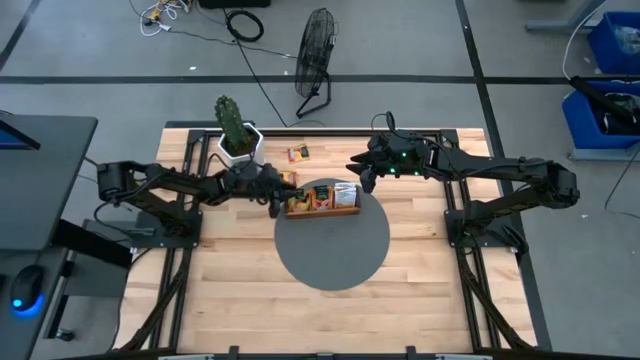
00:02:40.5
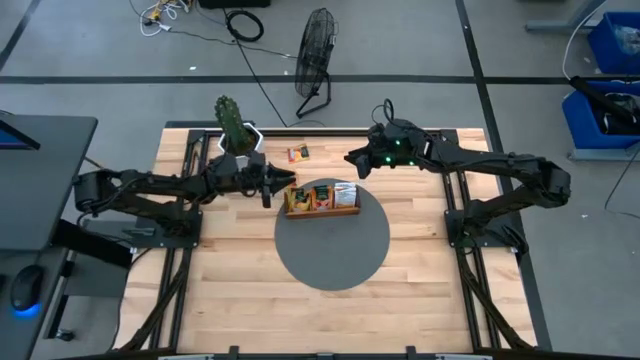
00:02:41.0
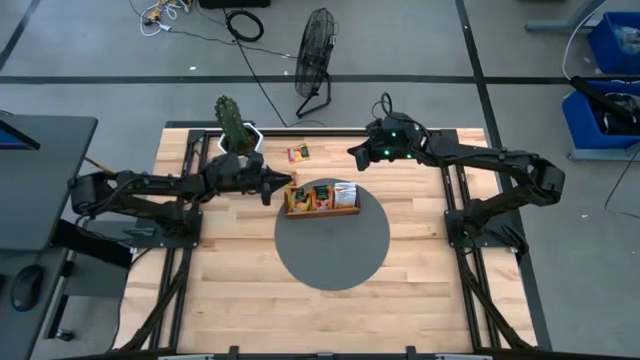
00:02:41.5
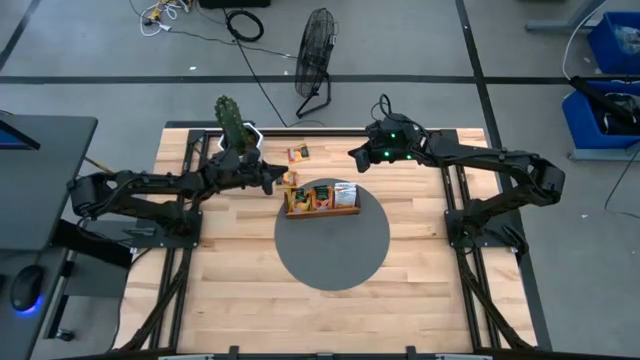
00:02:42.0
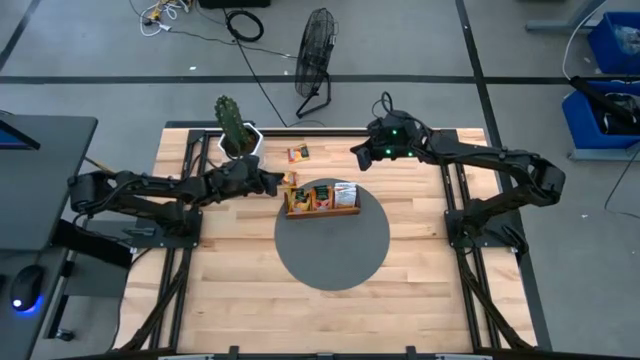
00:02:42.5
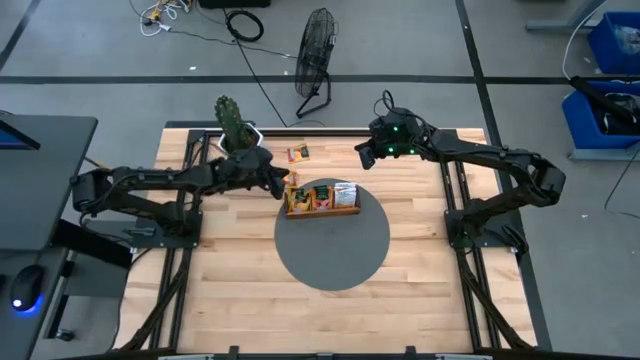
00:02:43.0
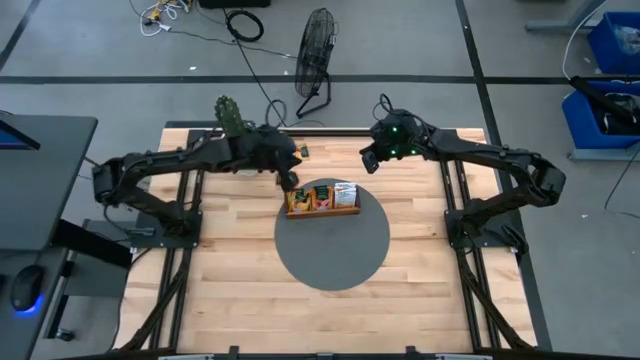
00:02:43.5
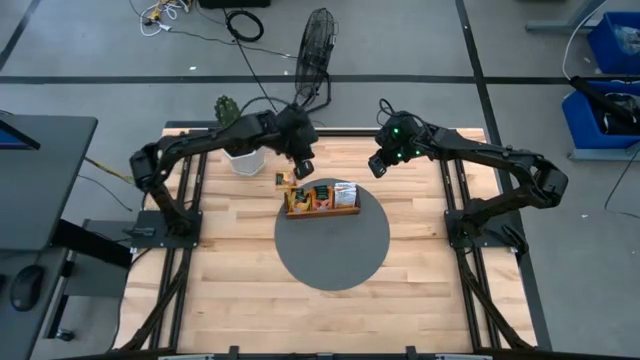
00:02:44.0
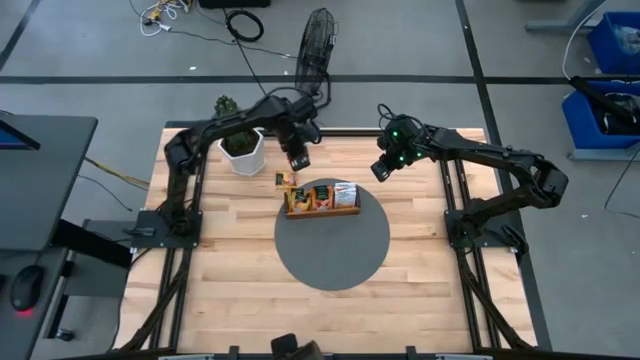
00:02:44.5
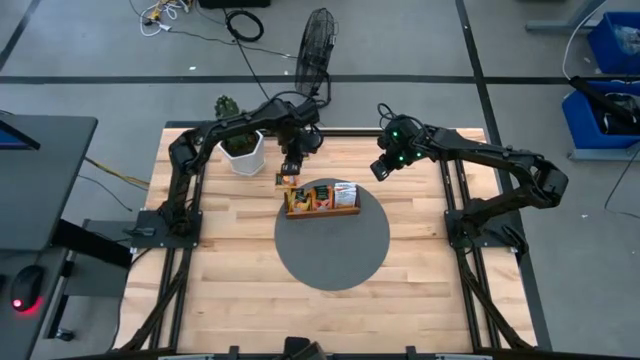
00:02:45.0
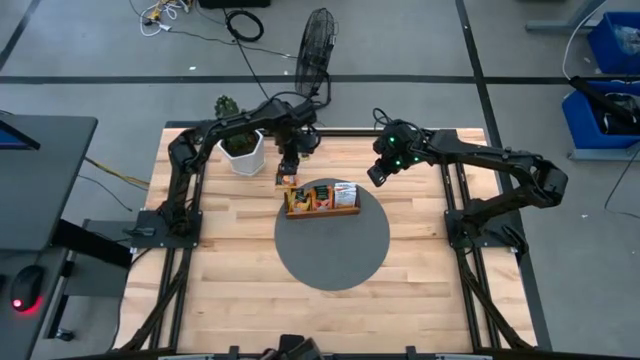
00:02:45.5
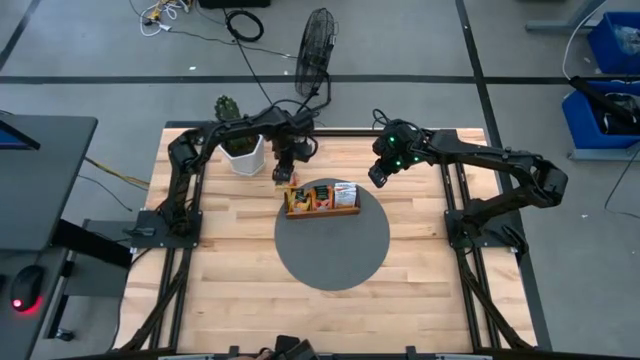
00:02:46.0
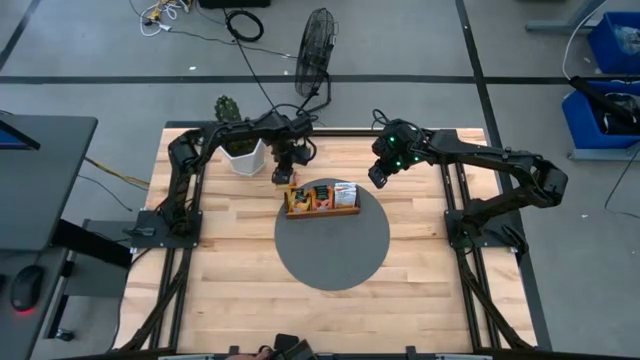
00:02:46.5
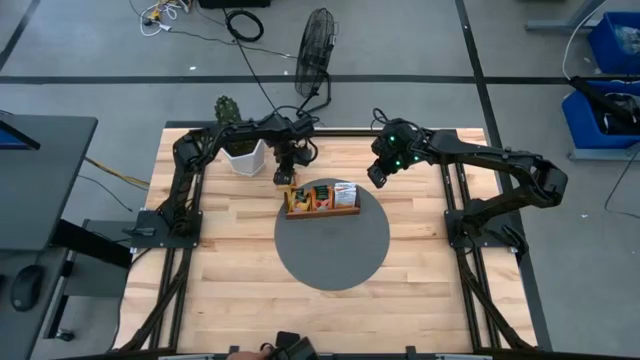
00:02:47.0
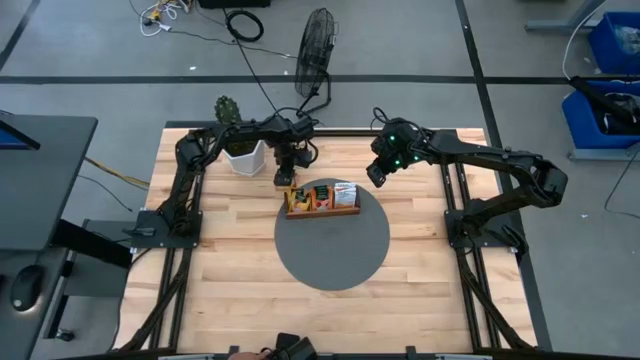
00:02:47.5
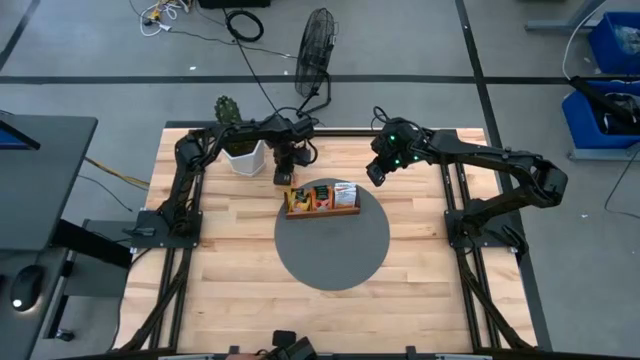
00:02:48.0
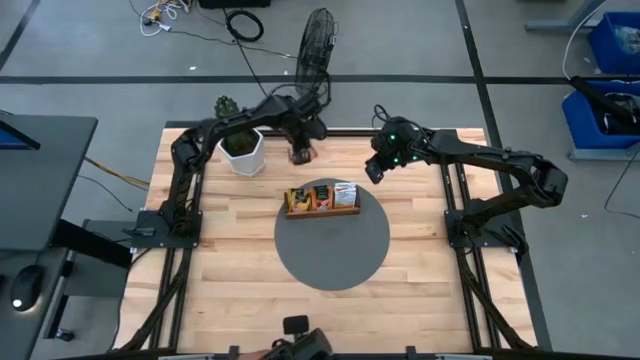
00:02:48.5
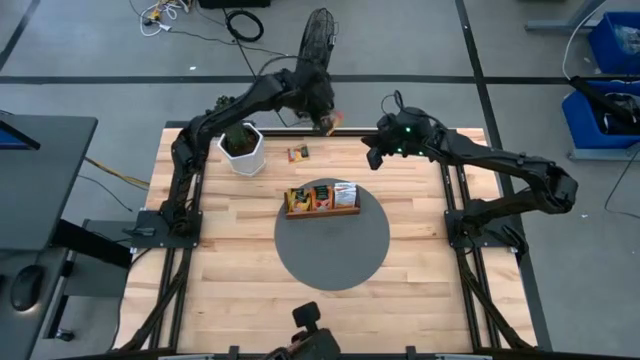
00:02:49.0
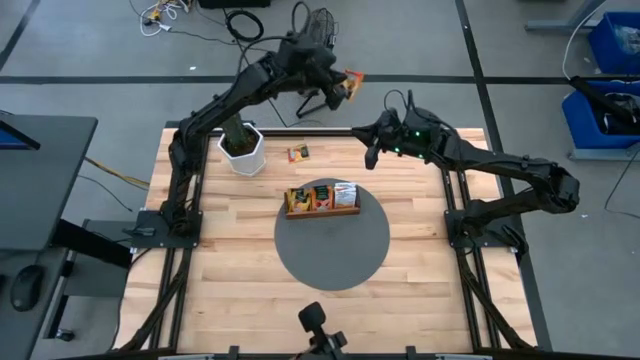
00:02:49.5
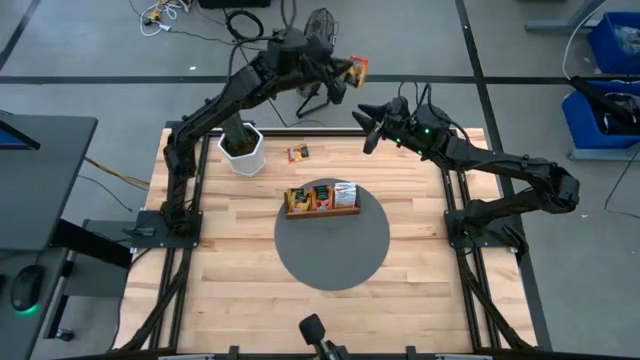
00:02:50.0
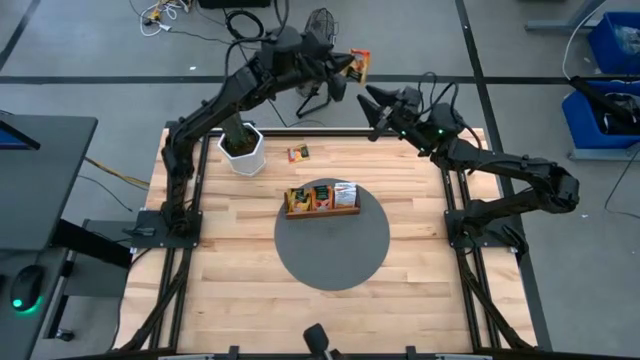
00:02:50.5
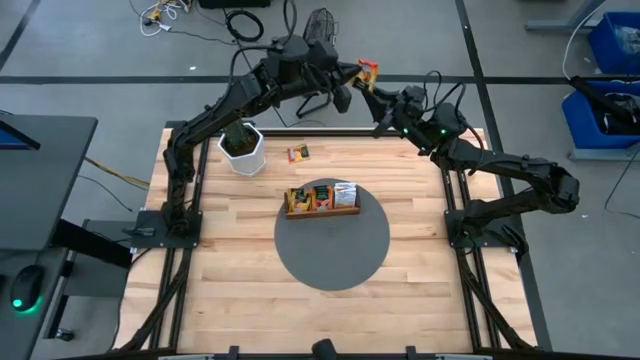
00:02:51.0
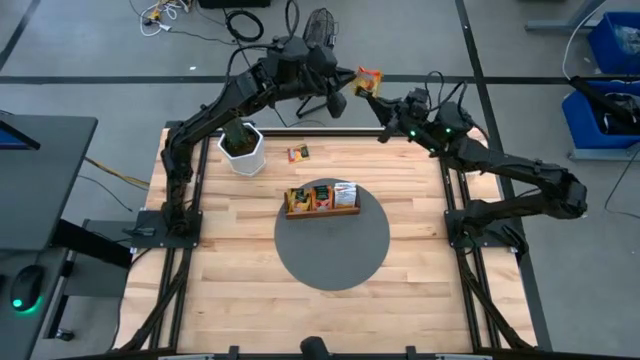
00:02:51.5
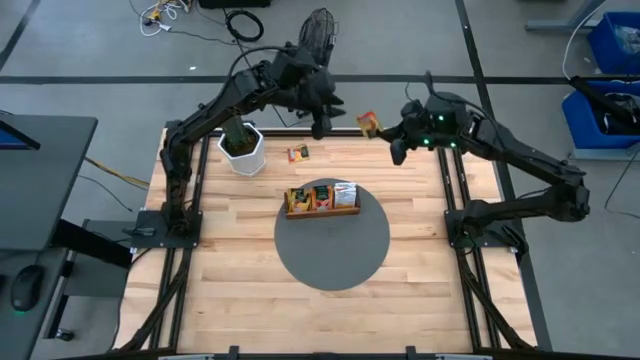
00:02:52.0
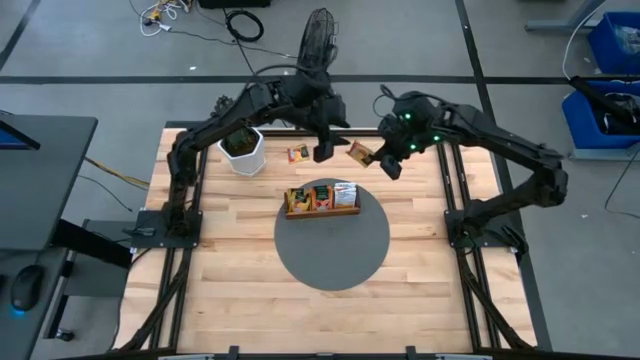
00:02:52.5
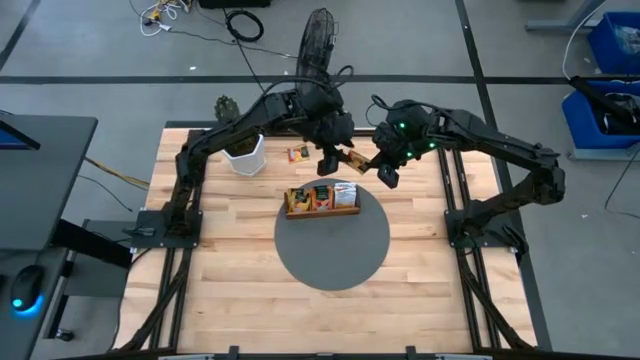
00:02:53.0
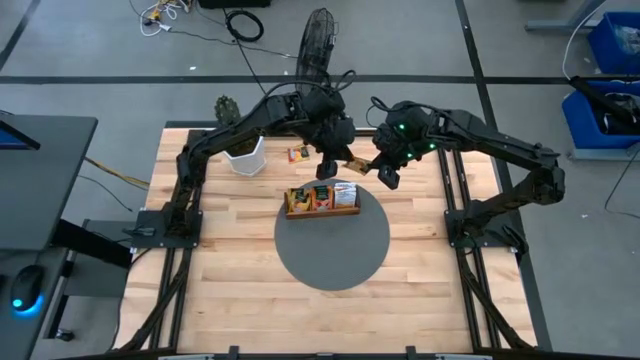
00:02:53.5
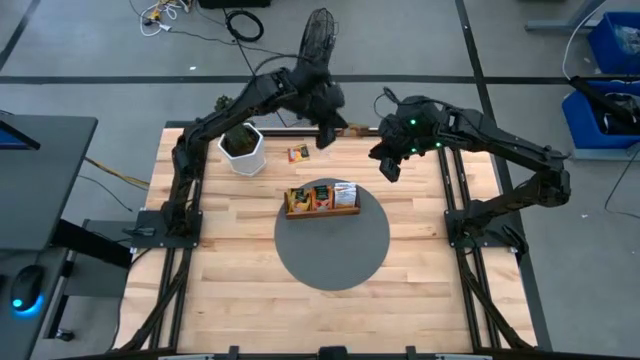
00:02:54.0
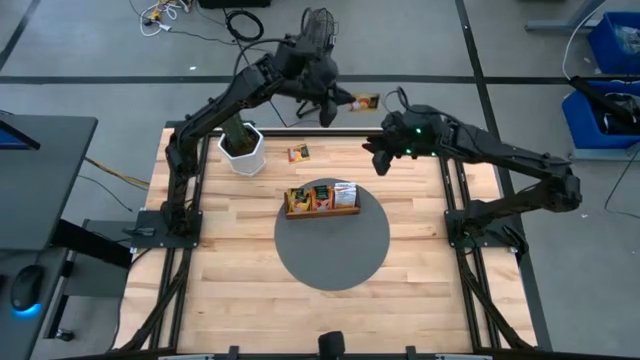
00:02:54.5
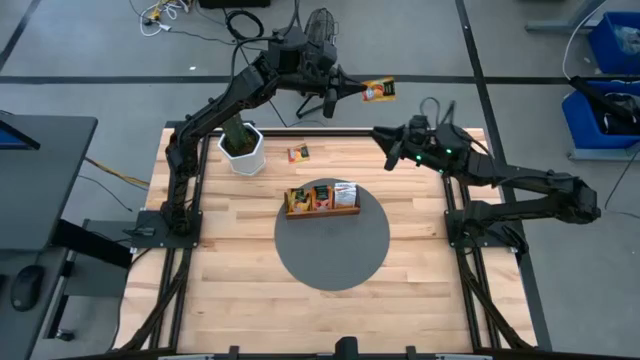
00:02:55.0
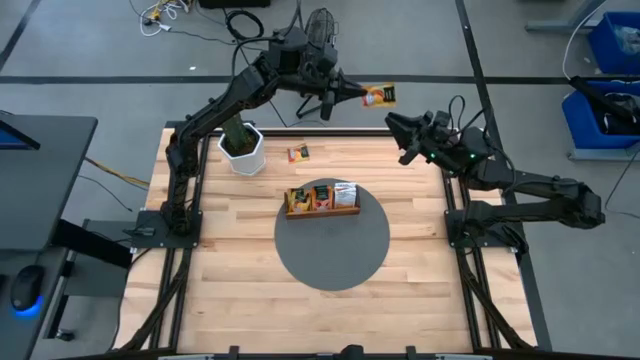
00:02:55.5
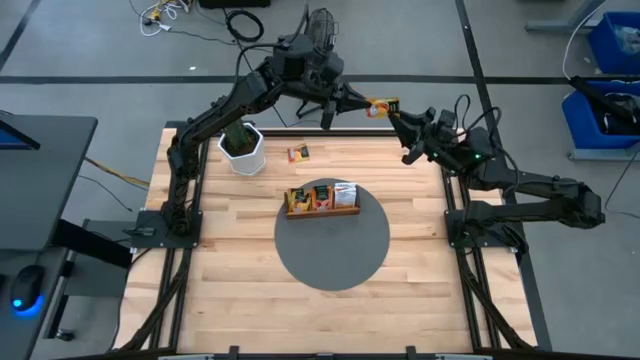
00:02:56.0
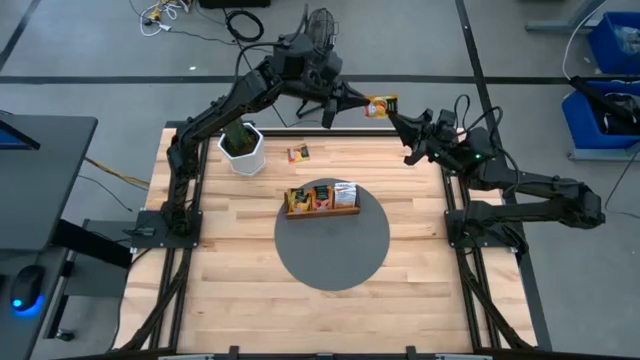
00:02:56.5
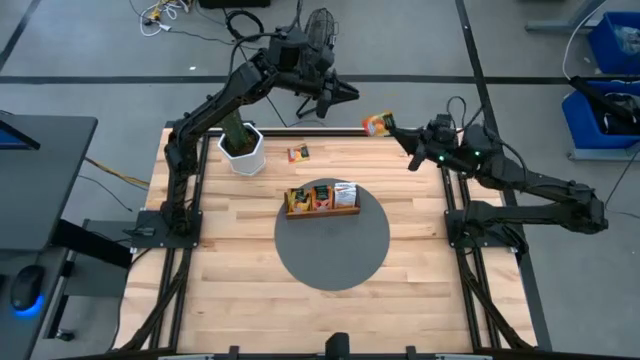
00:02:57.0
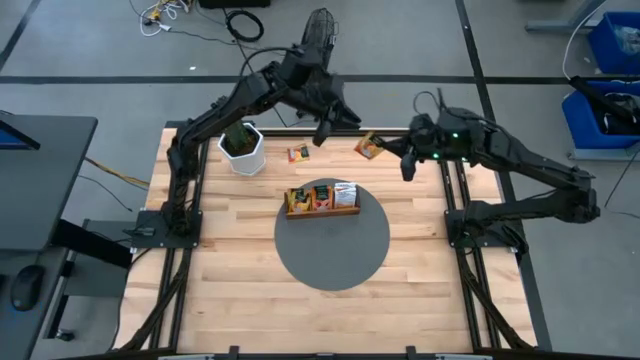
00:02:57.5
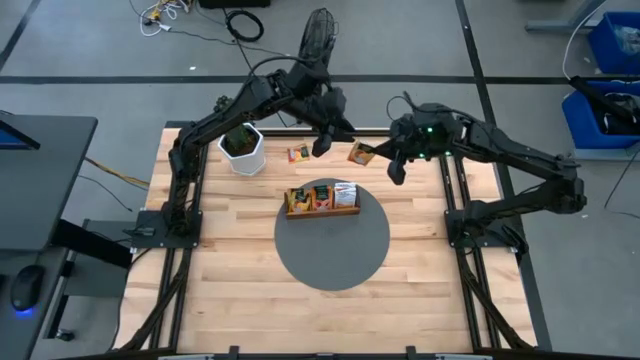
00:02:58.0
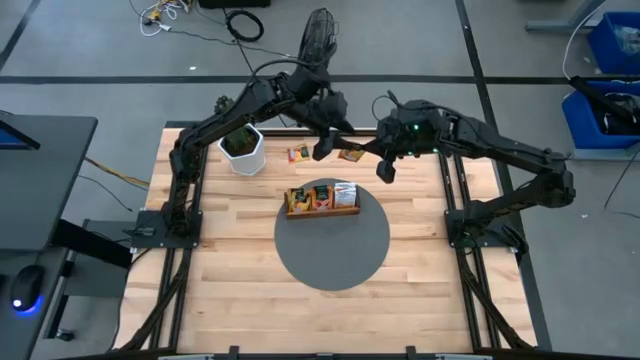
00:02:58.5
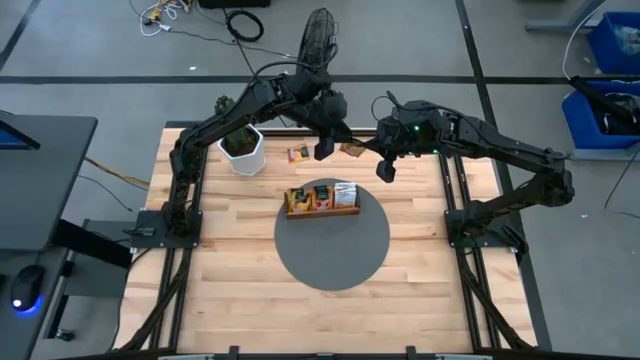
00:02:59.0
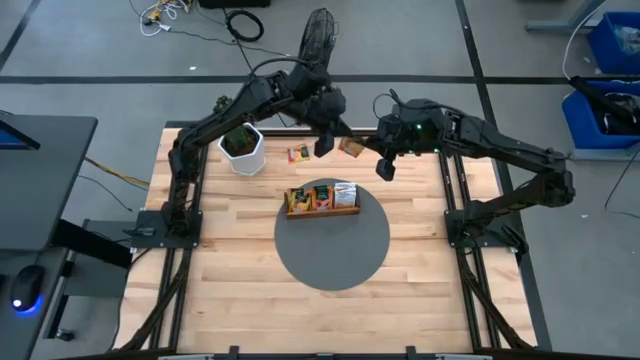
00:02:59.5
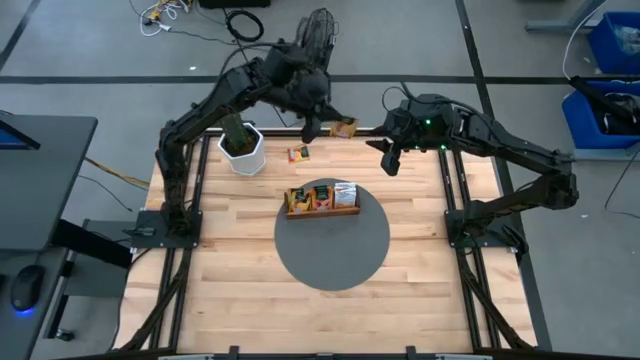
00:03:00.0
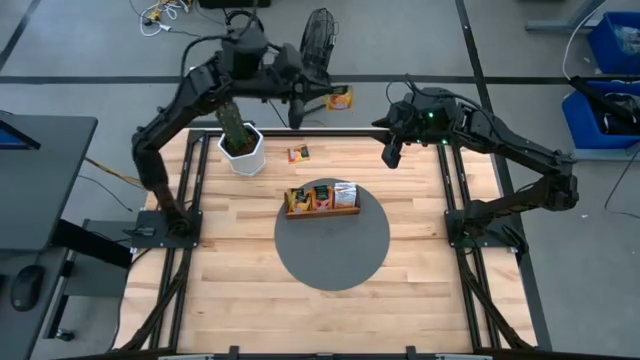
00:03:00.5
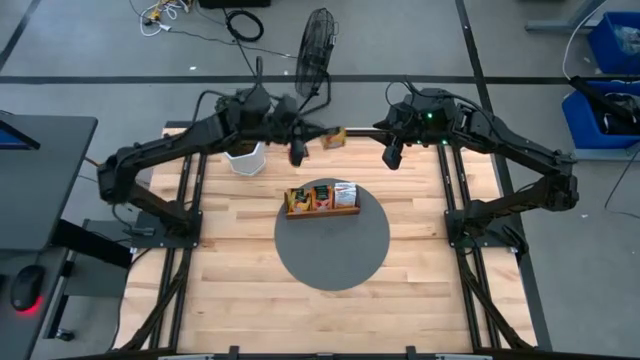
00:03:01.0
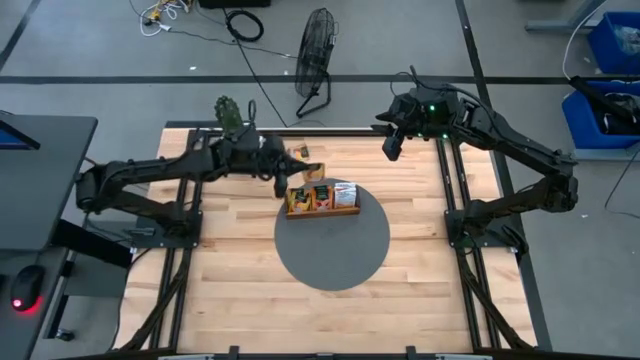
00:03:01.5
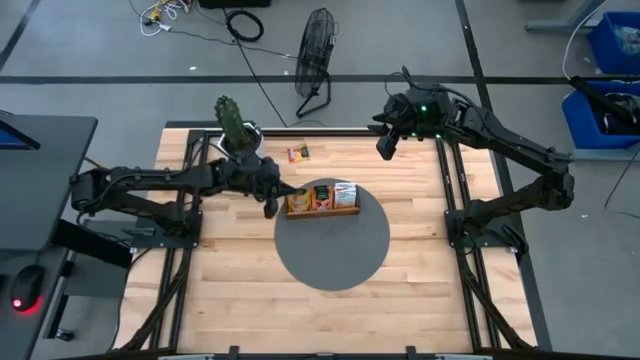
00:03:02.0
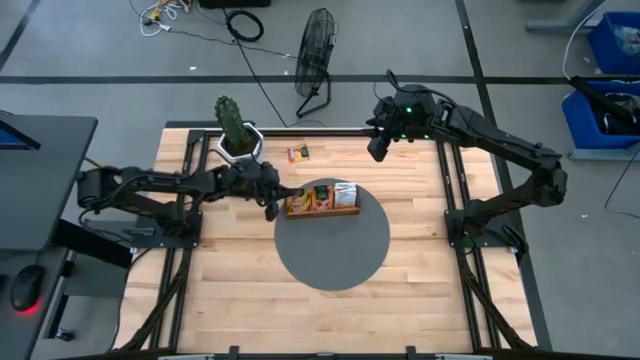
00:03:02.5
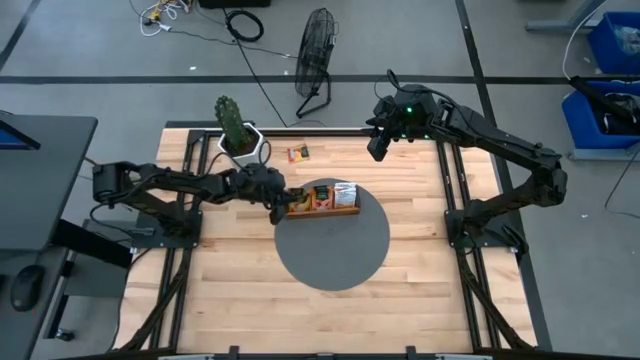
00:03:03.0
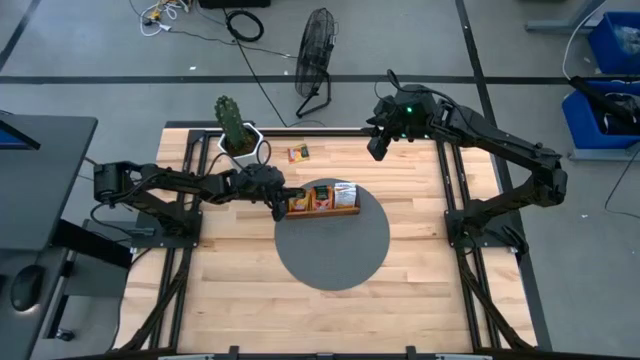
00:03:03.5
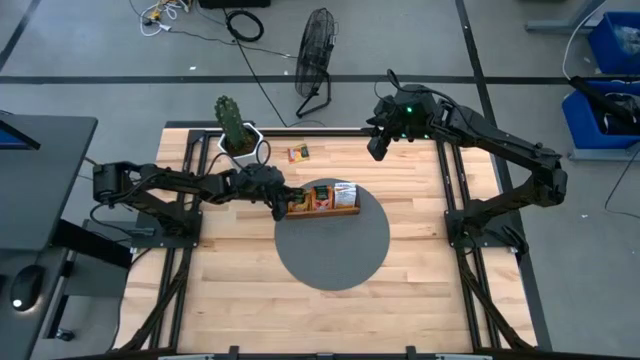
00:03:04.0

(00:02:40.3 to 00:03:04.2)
Task: Pick & Place Tea
Put the orange tea bag into the left section of the wooden organizer
